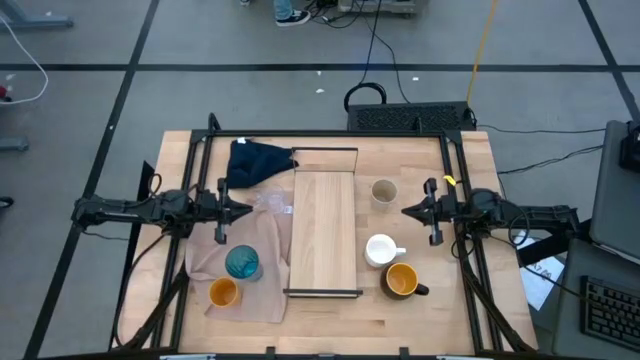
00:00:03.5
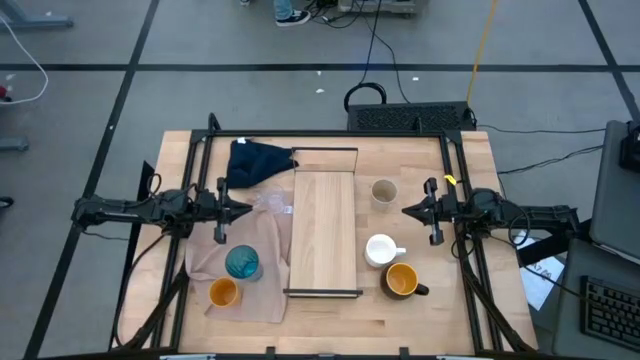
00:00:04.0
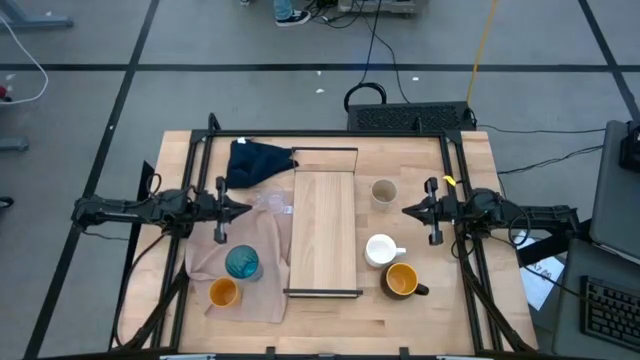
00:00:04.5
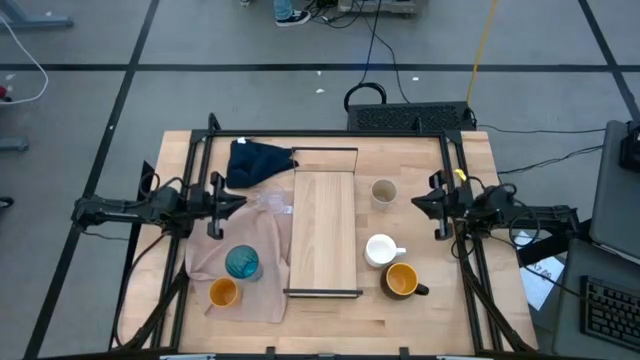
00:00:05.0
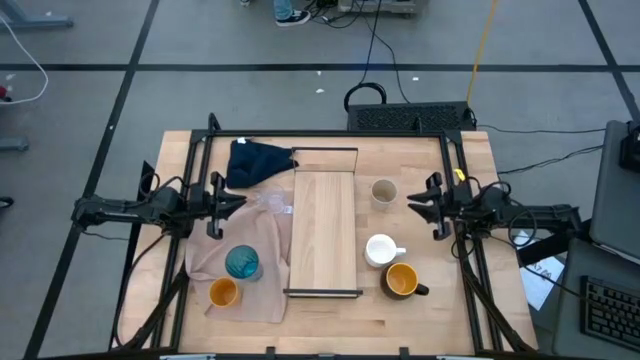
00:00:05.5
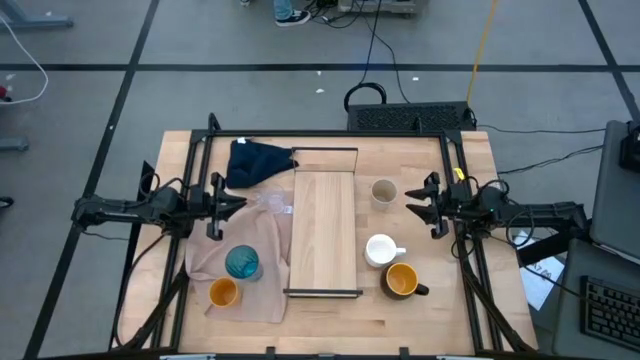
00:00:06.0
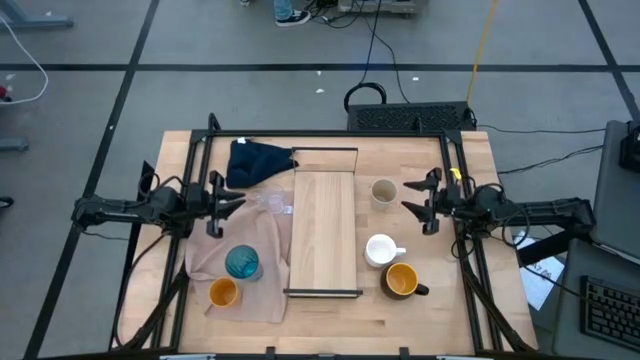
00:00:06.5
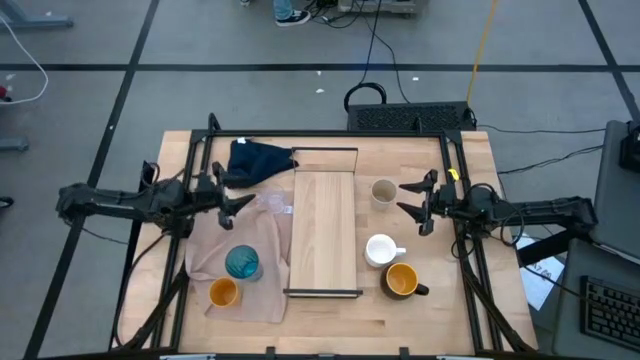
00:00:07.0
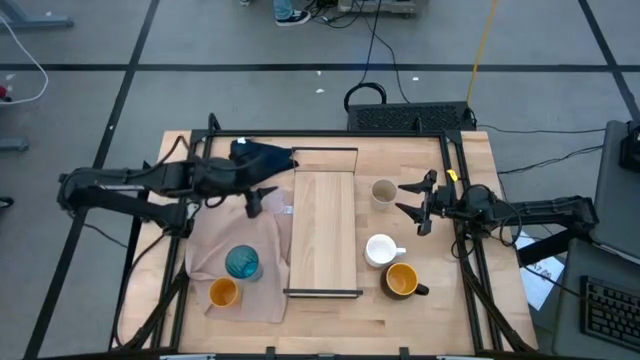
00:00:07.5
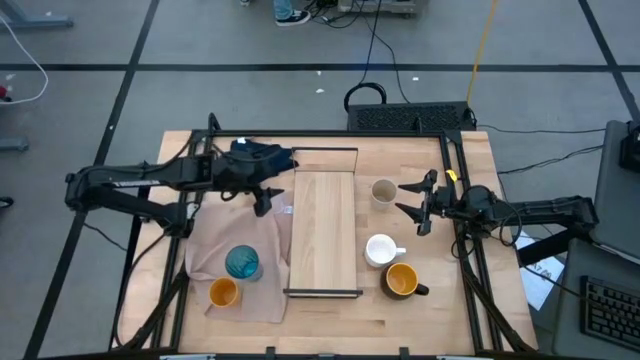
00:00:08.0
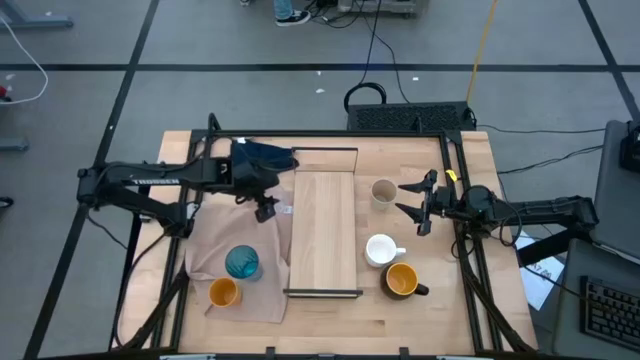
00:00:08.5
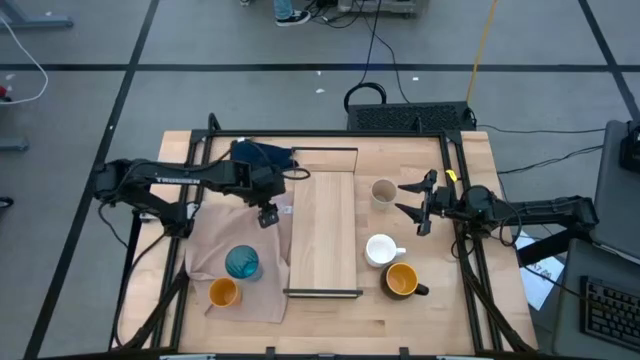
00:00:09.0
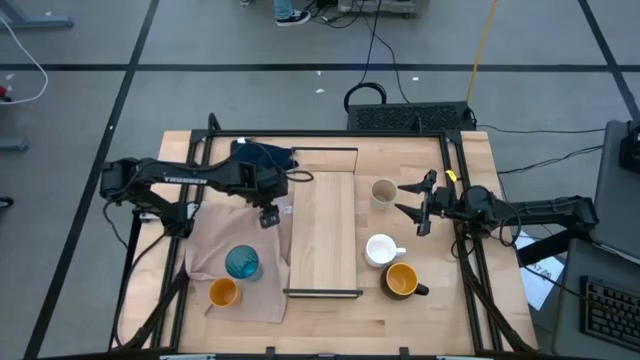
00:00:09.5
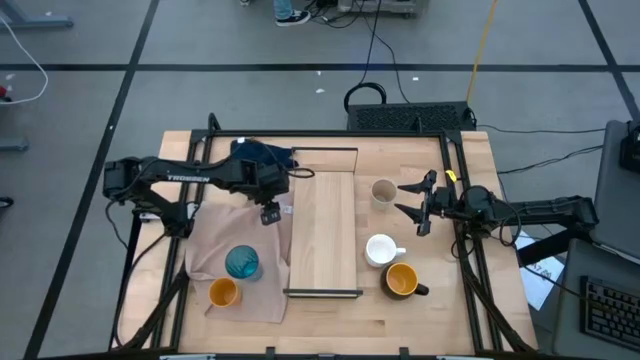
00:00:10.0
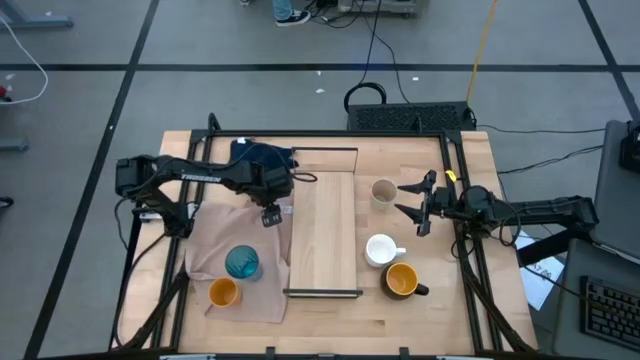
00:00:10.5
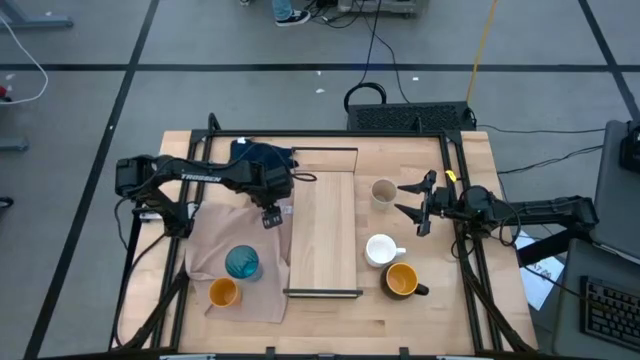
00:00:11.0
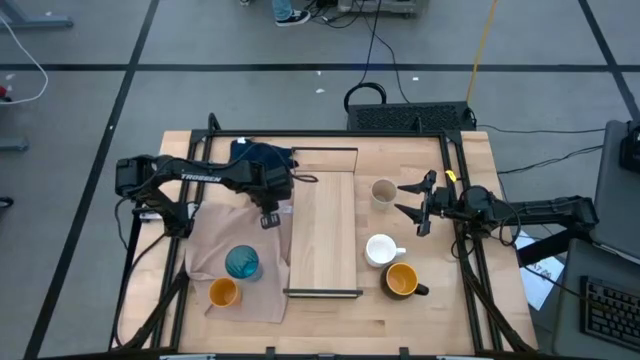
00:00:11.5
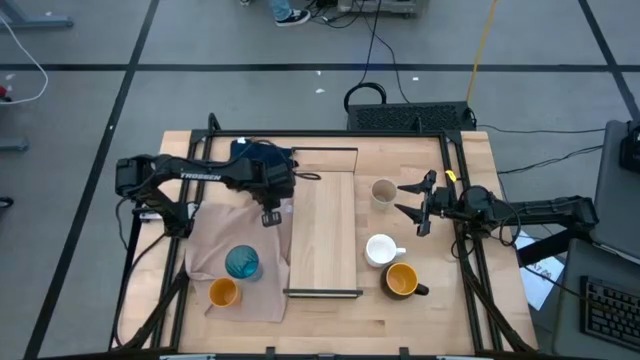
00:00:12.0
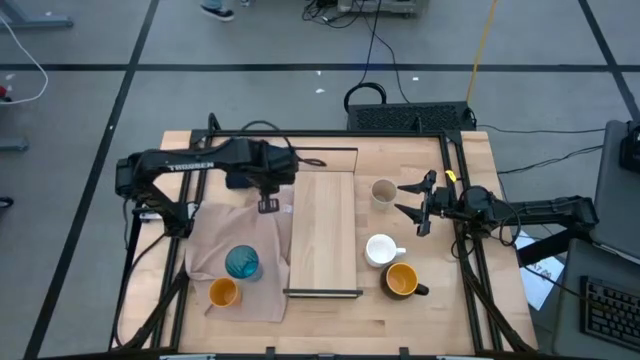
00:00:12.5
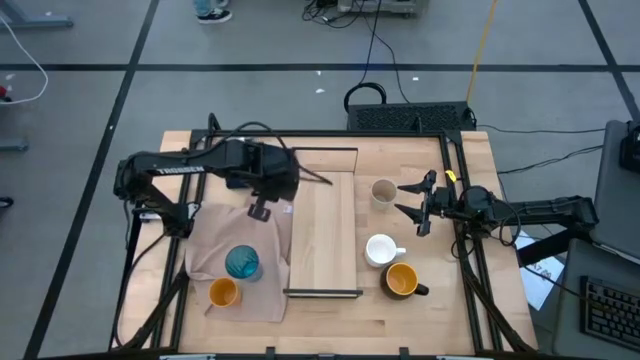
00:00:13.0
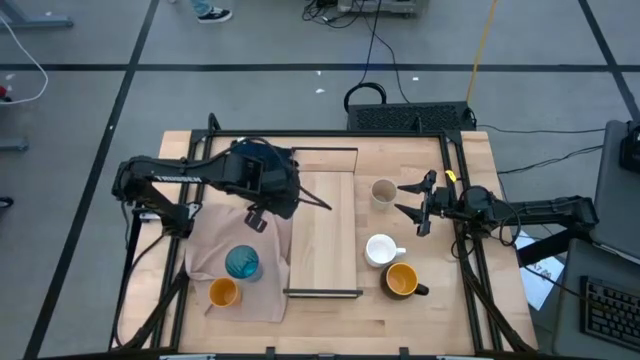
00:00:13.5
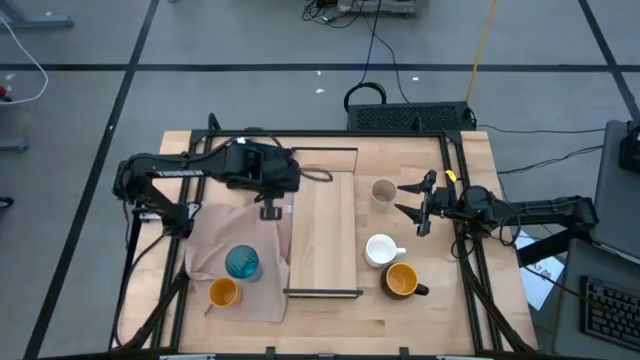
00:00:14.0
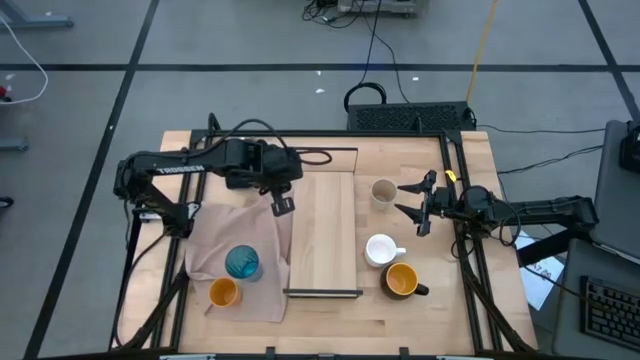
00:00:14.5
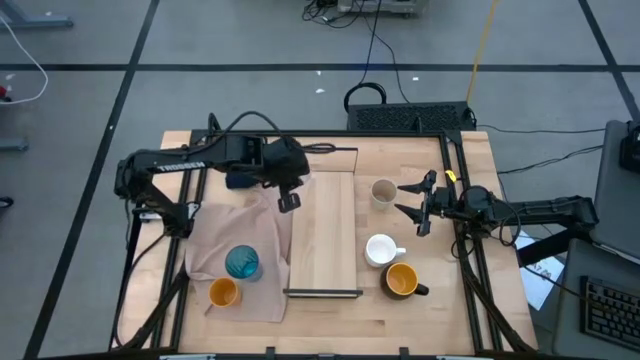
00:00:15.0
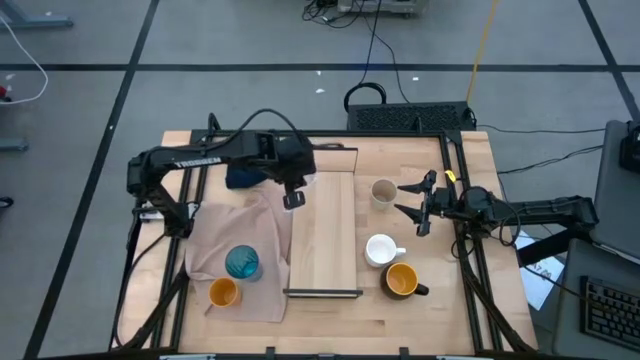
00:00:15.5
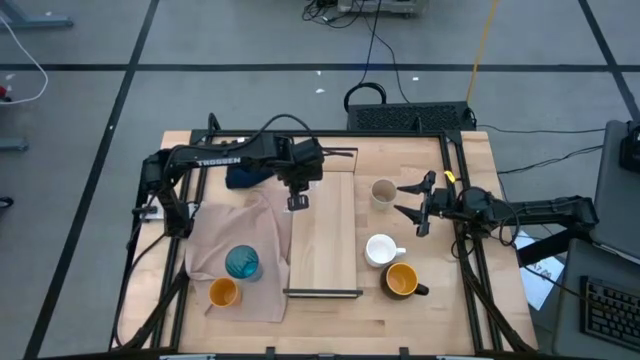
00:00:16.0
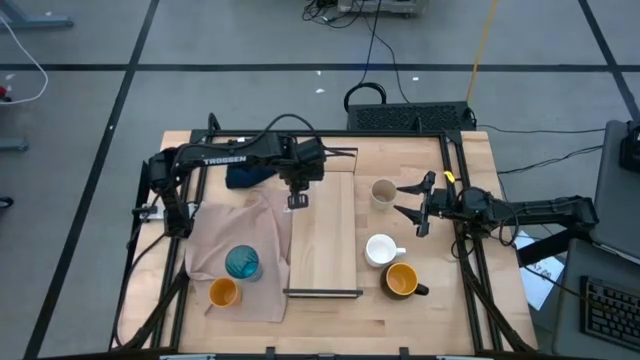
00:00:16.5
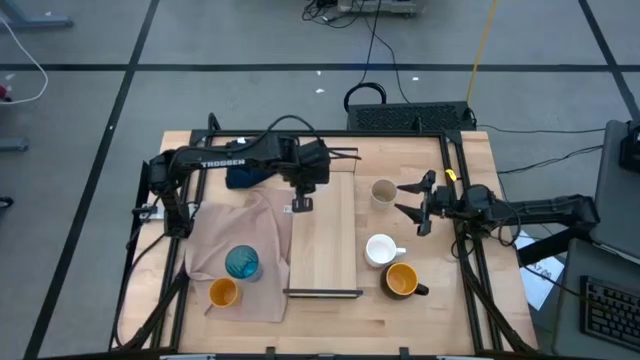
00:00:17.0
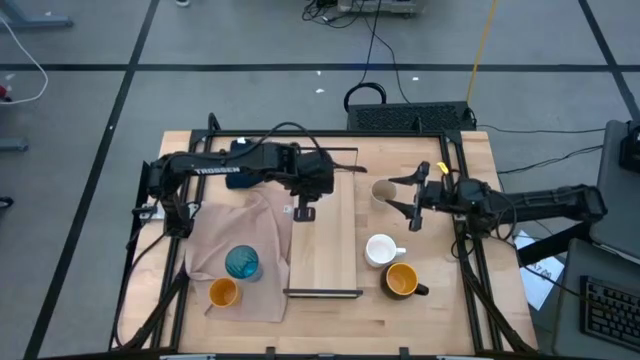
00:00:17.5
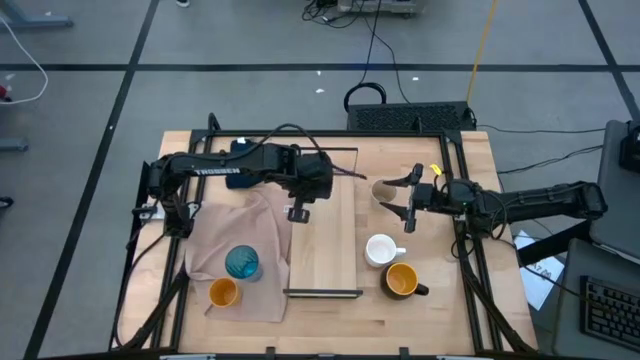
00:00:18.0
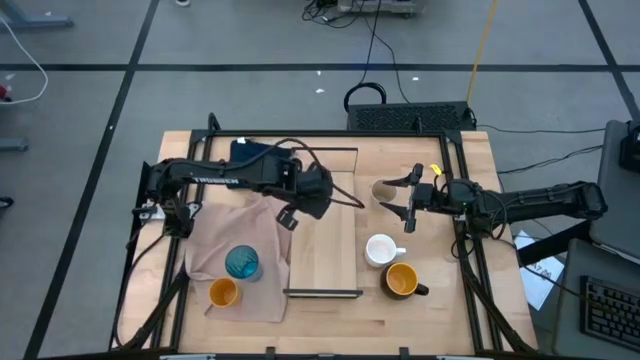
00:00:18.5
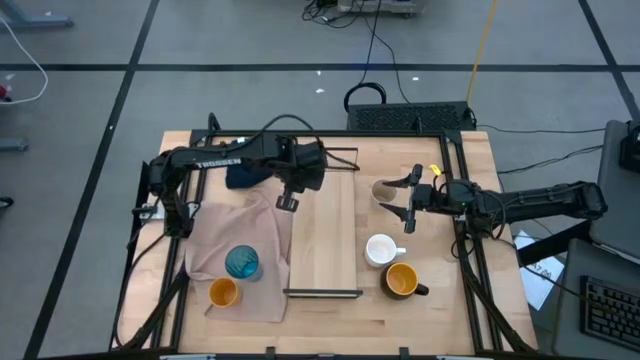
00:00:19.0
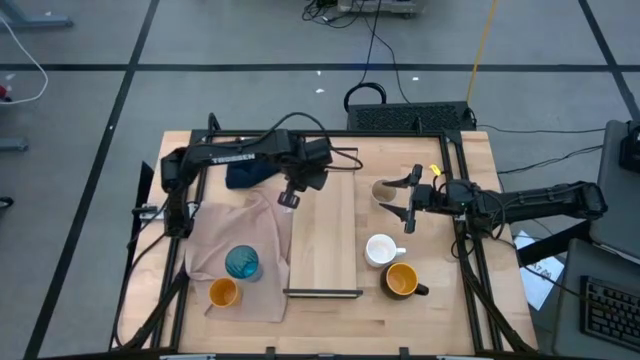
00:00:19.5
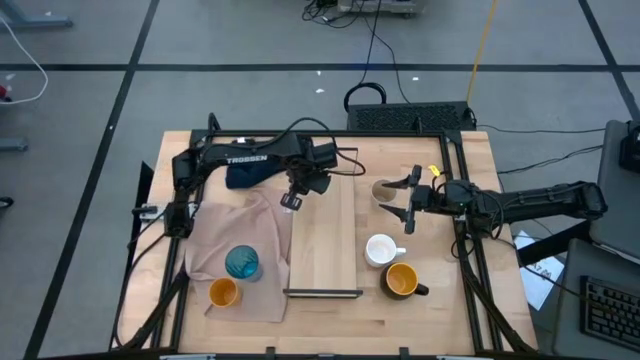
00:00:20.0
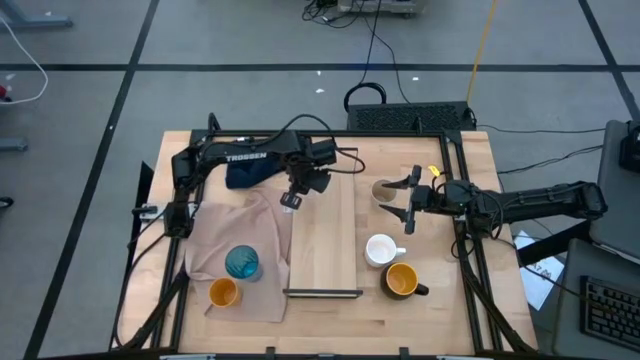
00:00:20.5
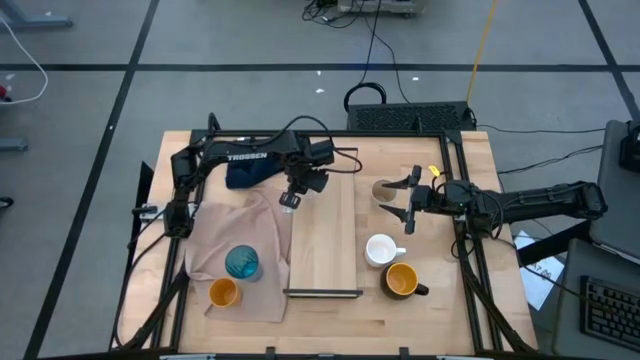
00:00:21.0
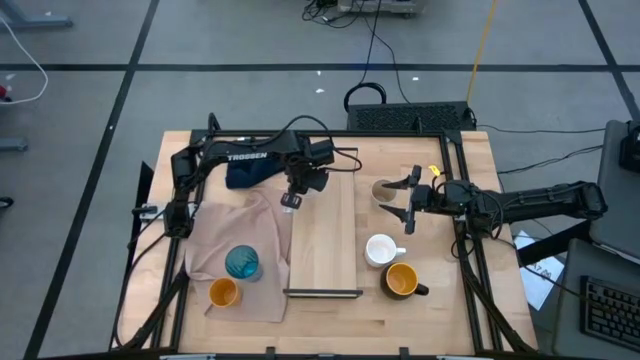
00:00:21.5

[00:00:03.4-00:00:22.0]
Task: Stack small to large cups/mugs on shelf
Put the transparent glass on the shelf
